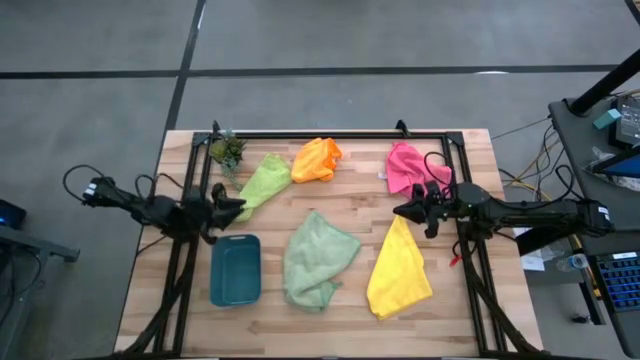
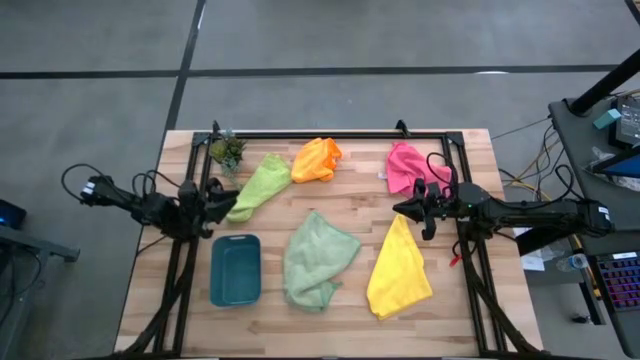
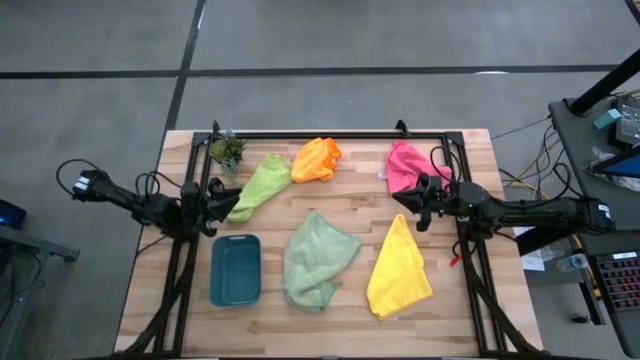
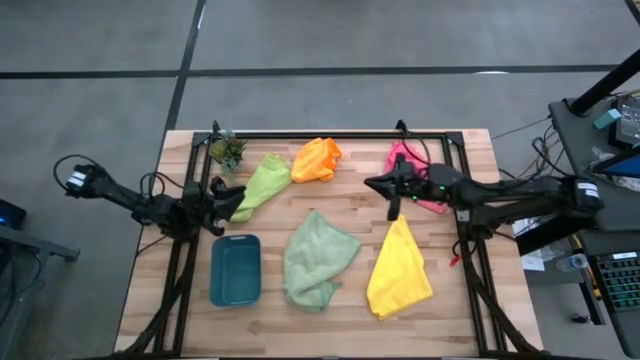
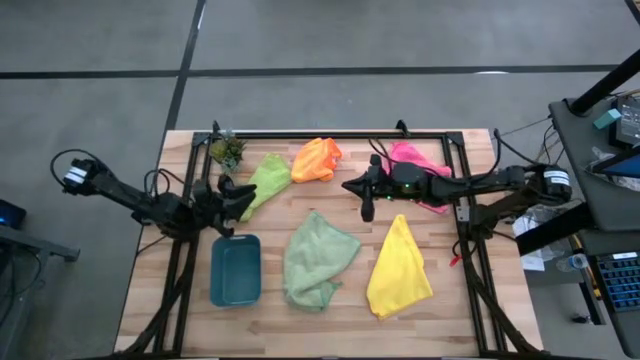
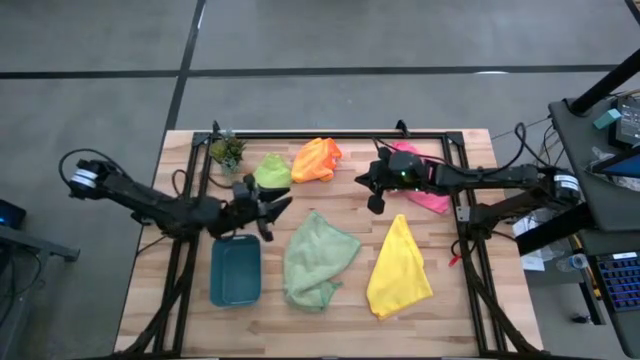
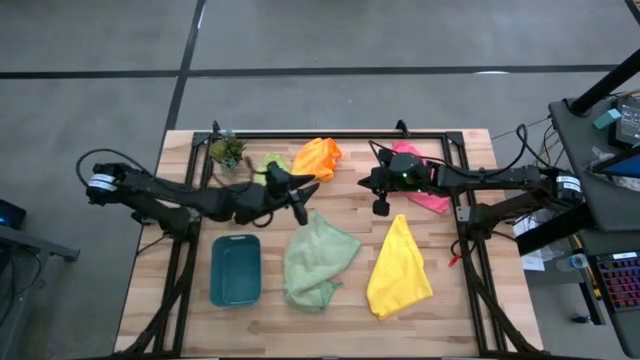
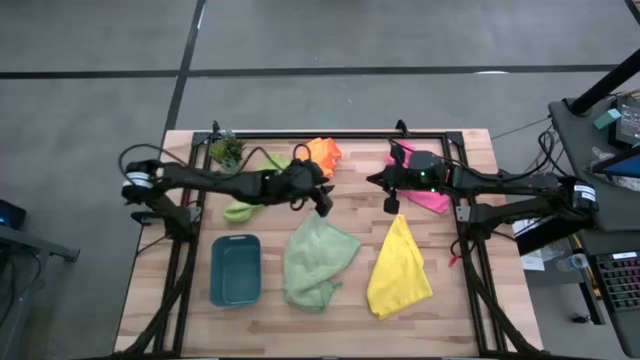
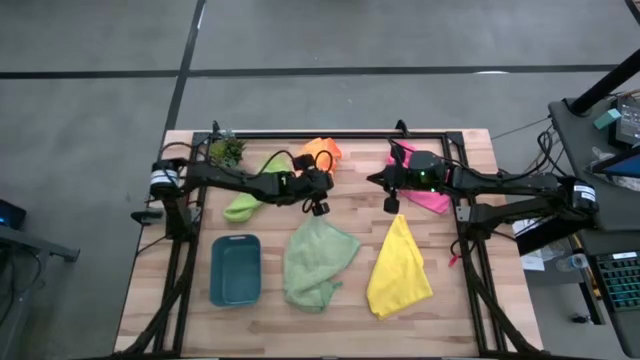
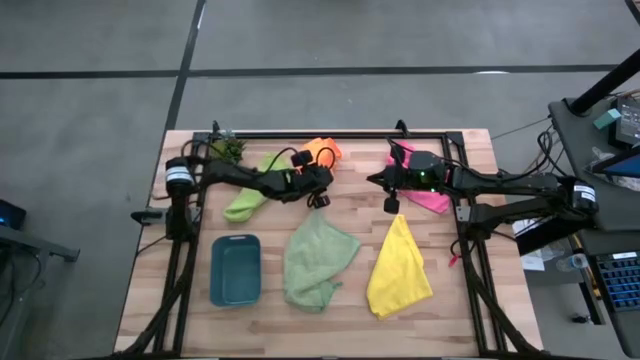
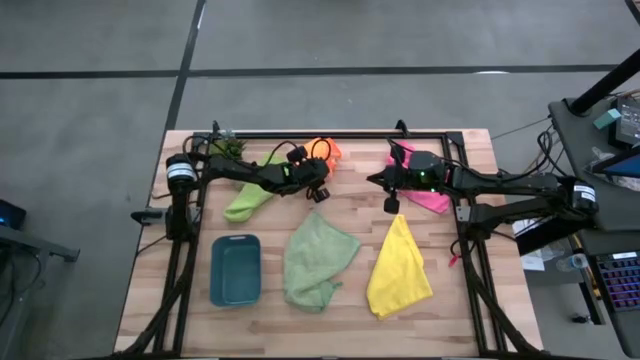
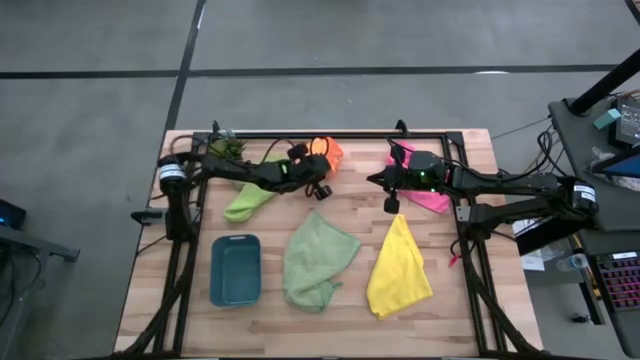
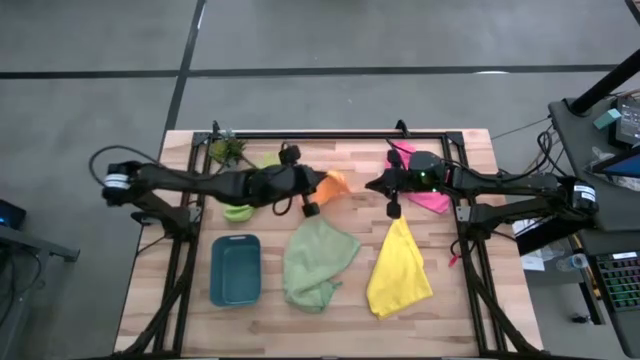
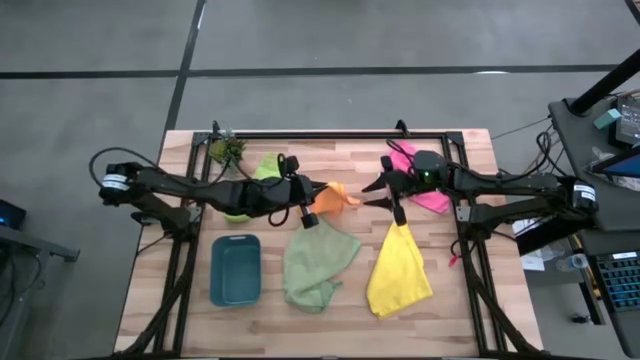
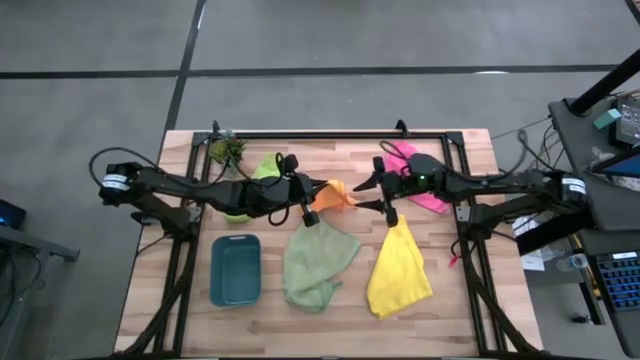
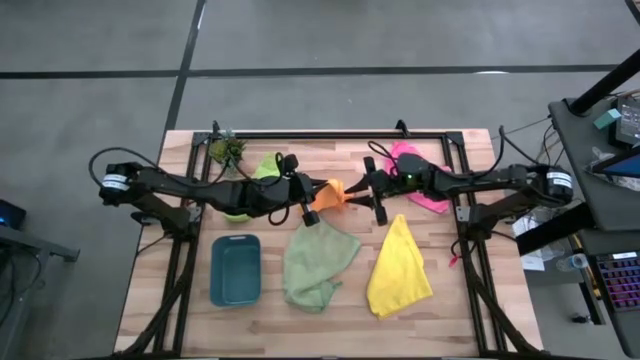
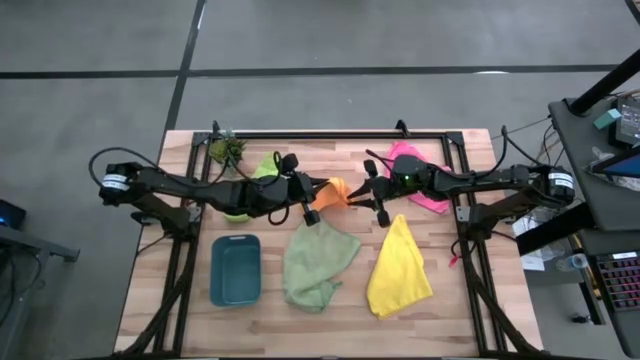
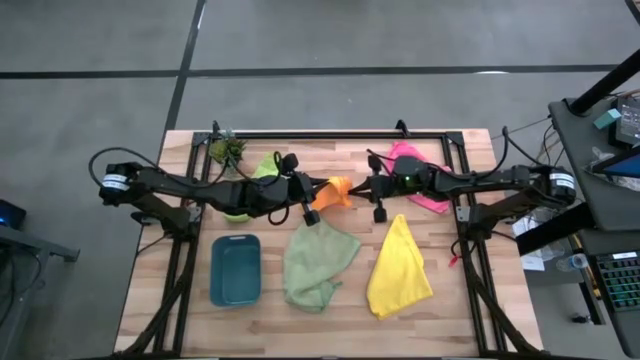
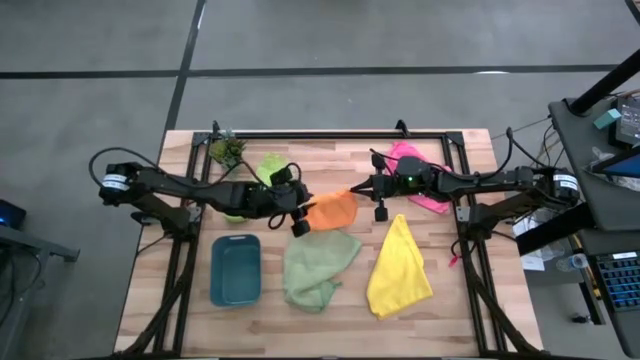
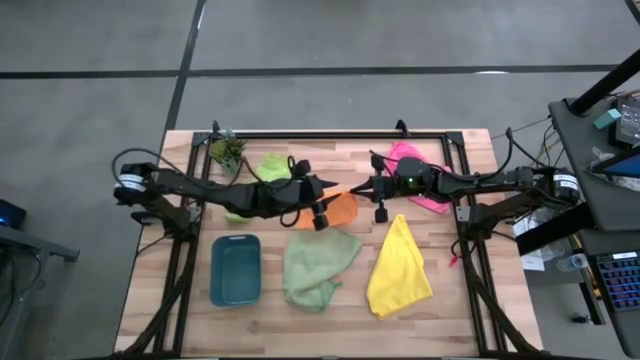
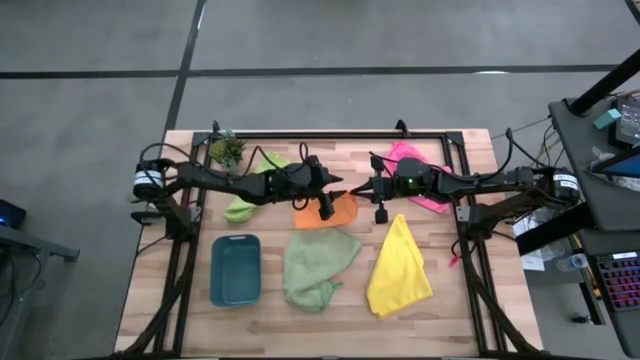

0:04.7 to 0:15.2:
Task: Fold microfiber towels
Fold the orange microfiber cloth

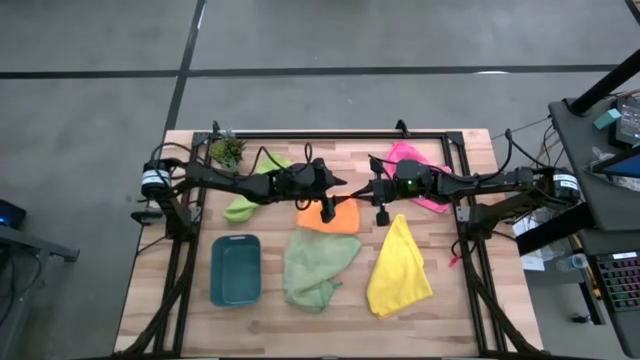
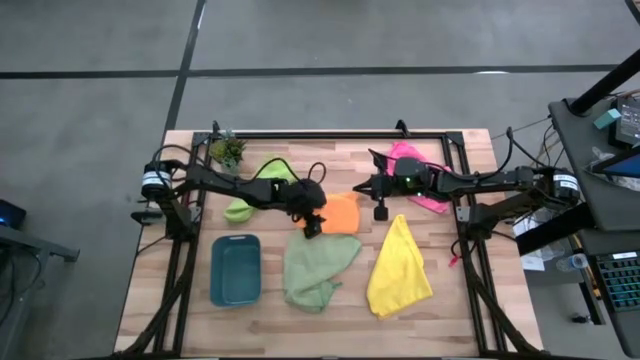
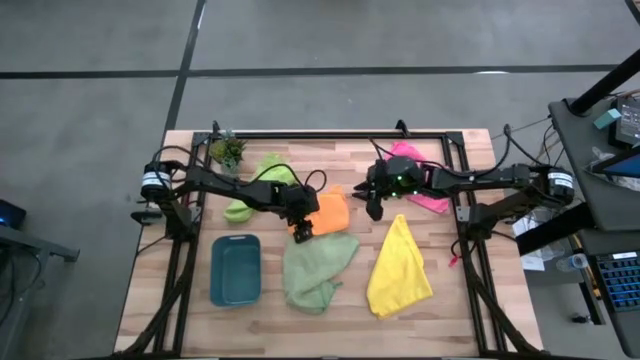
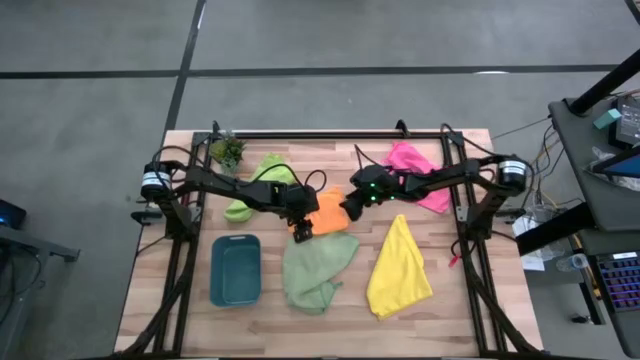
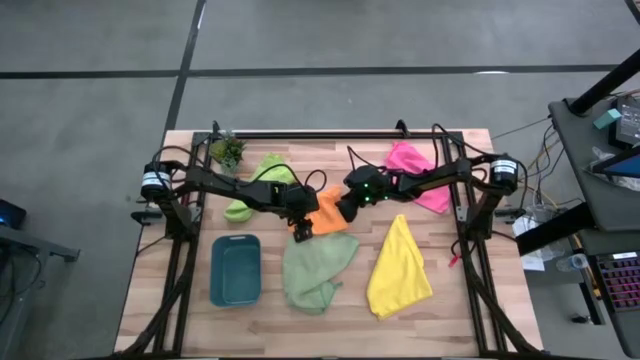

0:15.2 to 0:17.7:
Fold the orange microfiber cloth

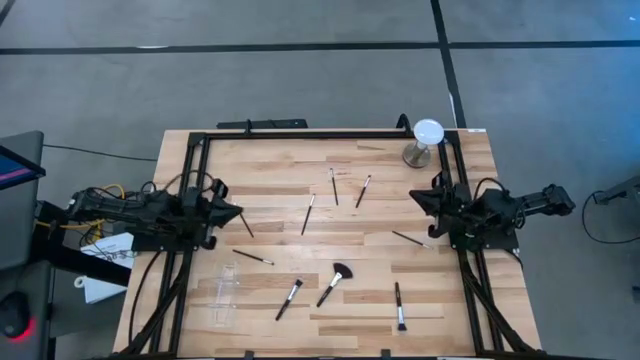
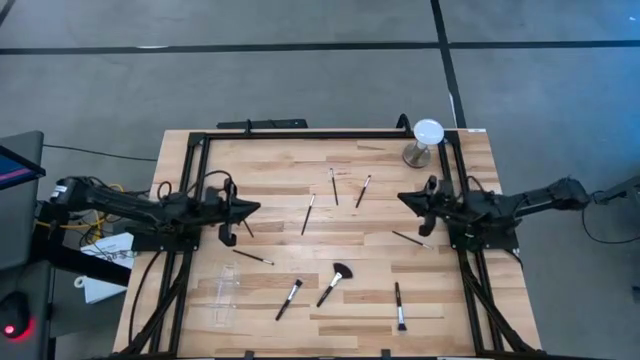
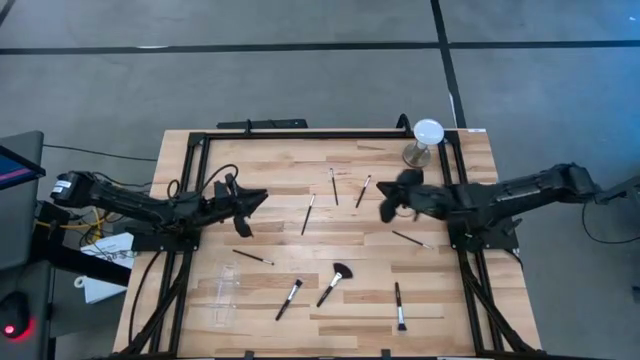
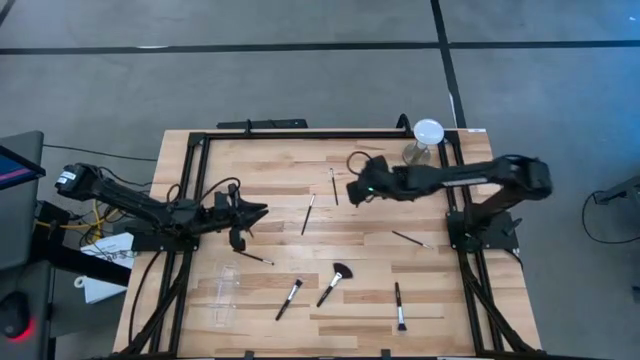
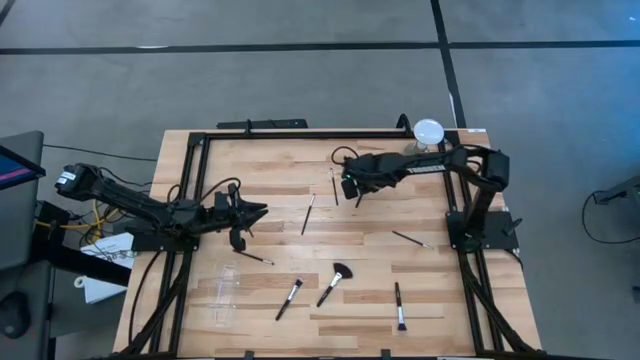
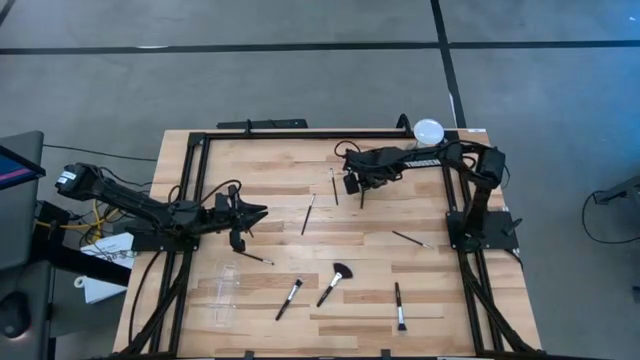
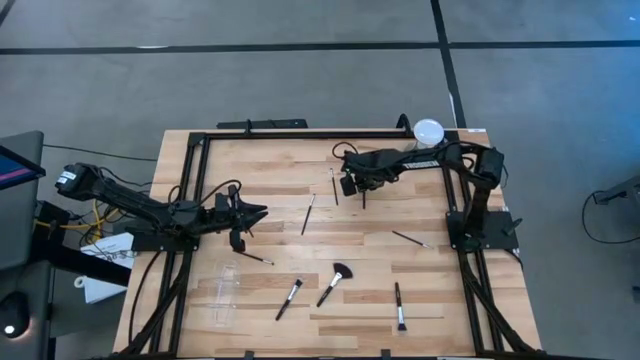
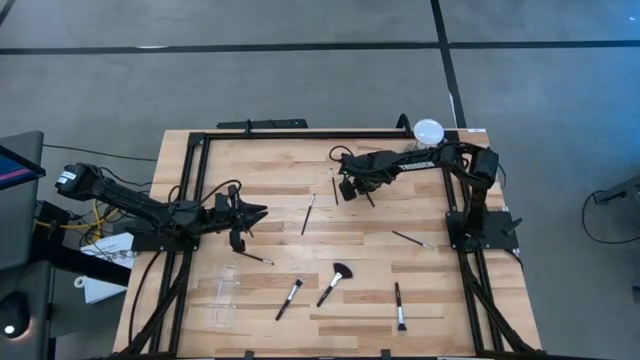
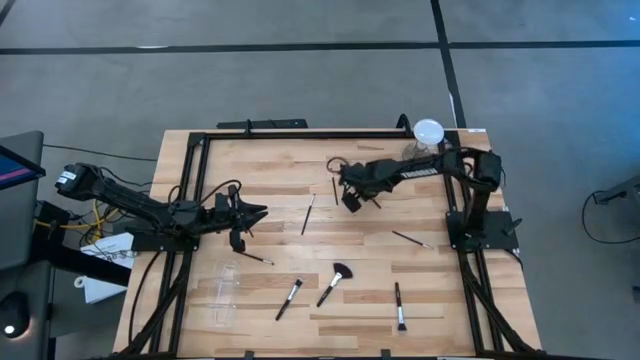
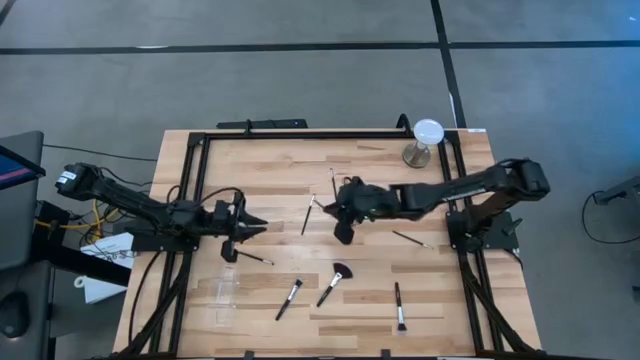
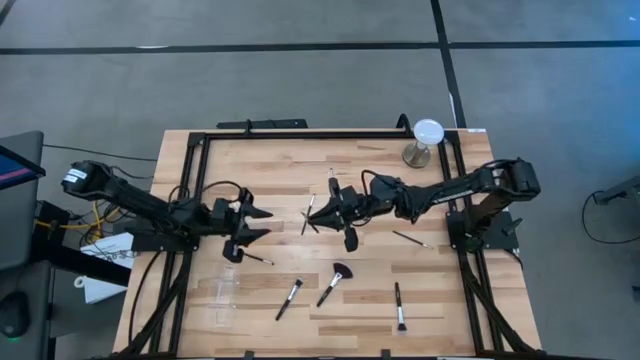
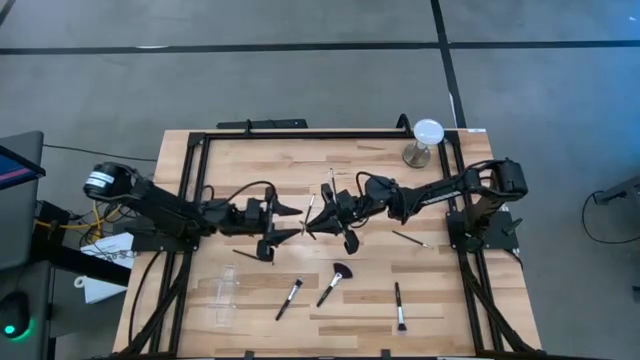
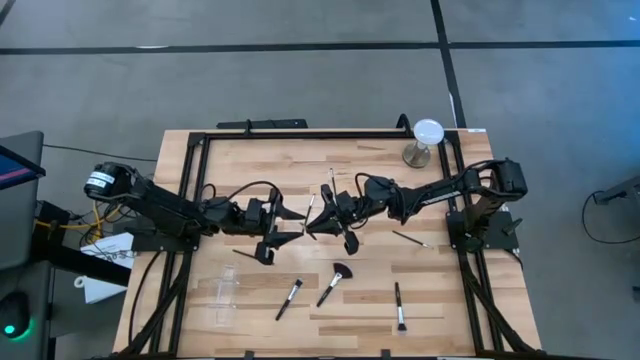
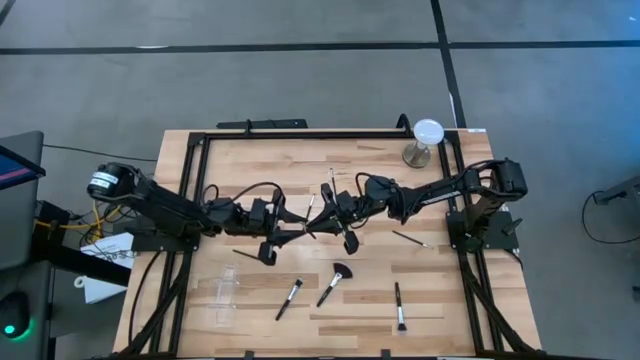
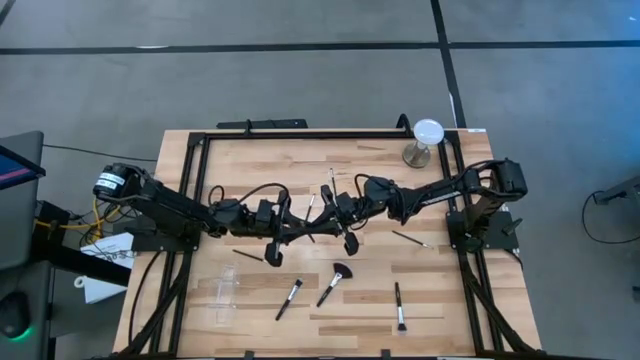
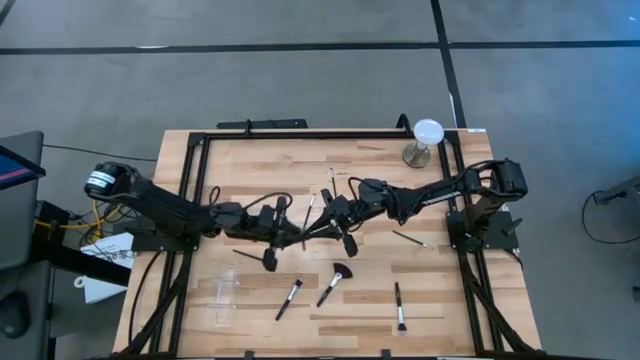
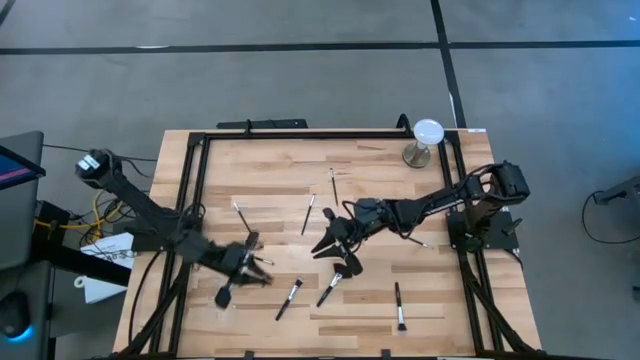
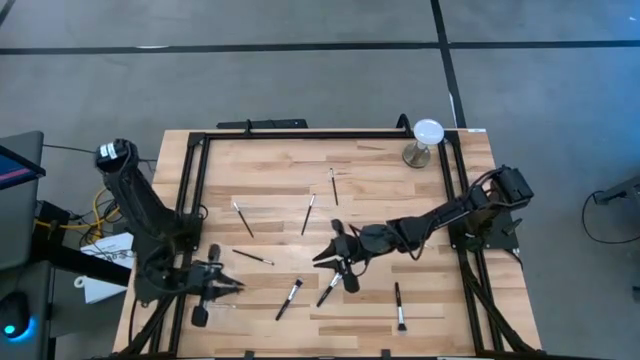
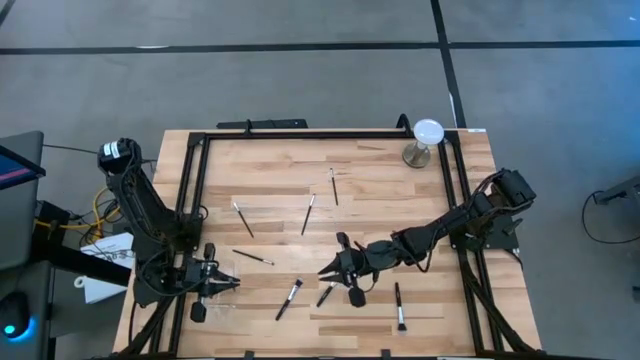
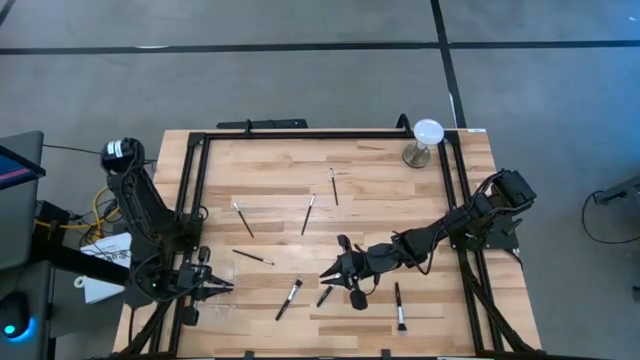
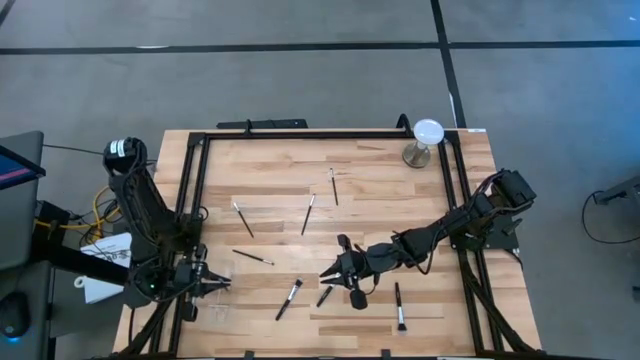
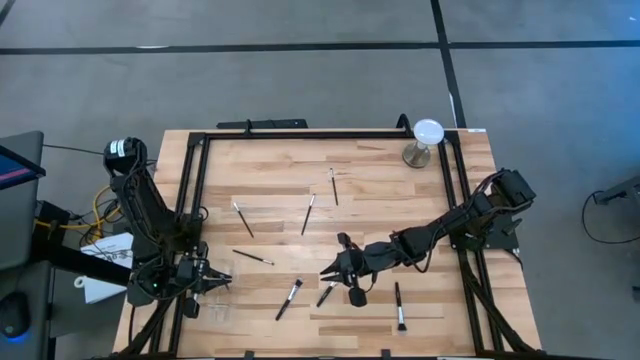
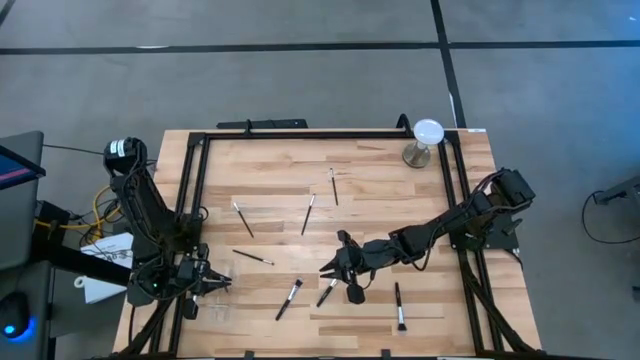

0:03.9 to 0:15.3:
Task: Put items in baskets/containers
Put the eyeshadow brush into the transparent organizer
